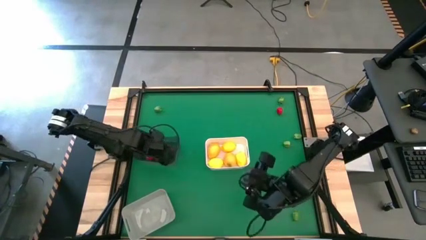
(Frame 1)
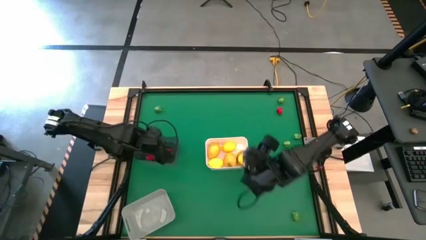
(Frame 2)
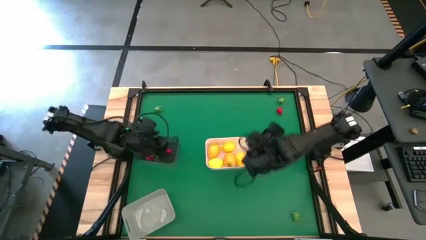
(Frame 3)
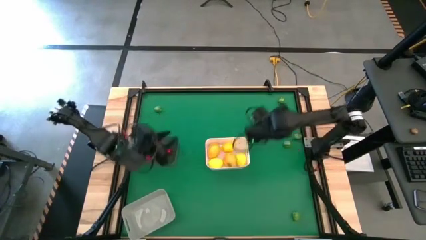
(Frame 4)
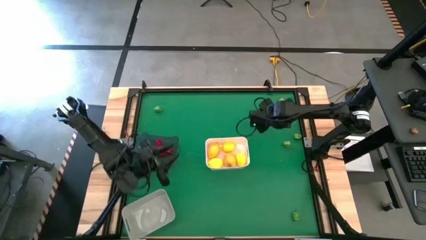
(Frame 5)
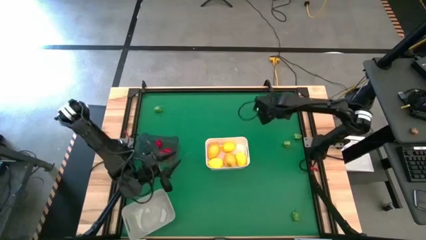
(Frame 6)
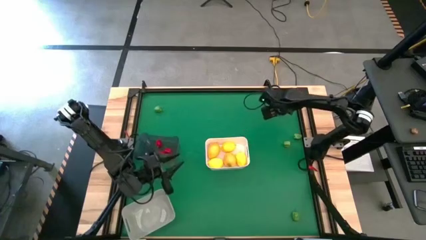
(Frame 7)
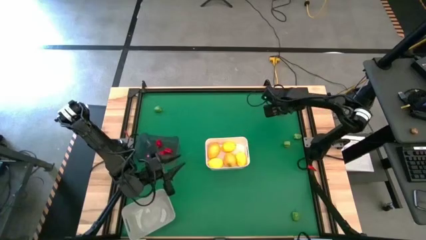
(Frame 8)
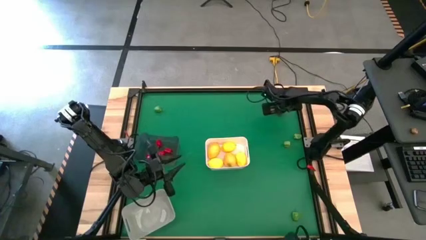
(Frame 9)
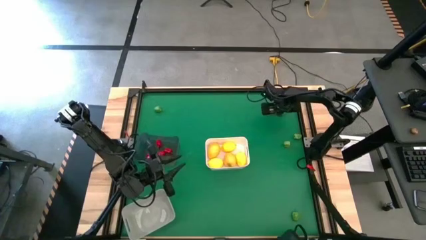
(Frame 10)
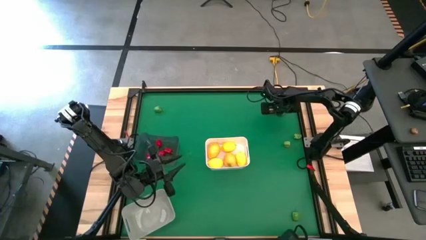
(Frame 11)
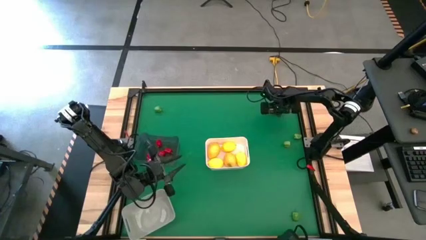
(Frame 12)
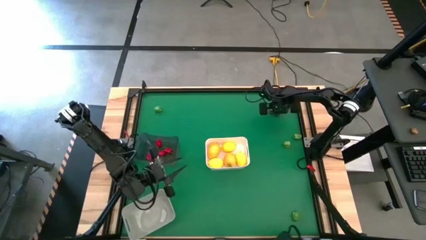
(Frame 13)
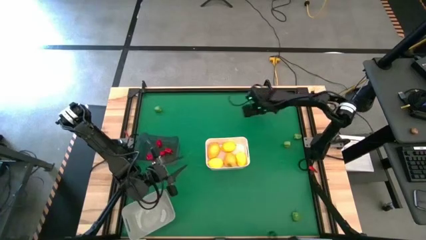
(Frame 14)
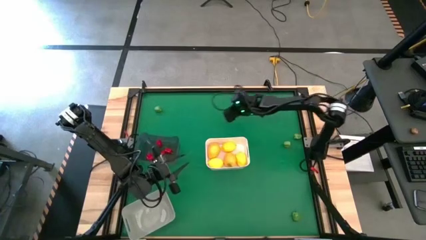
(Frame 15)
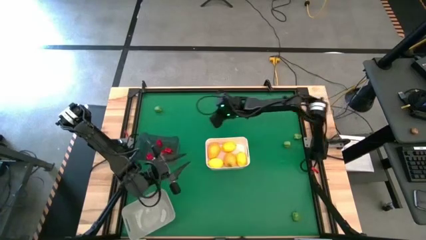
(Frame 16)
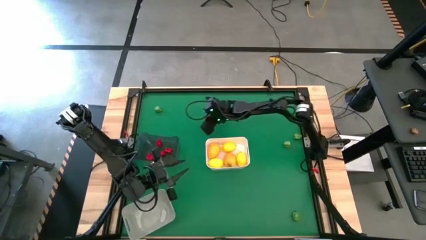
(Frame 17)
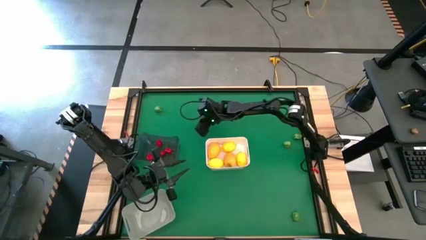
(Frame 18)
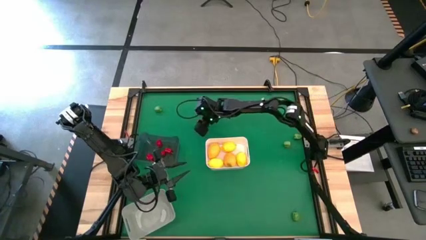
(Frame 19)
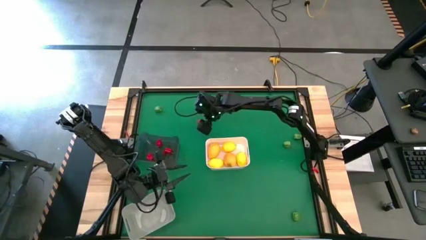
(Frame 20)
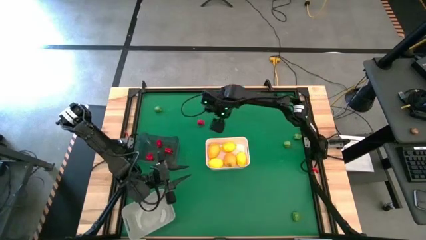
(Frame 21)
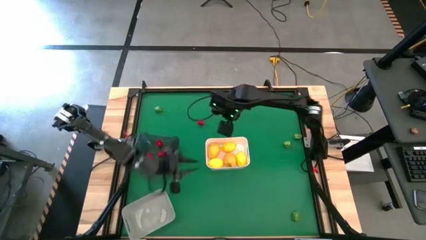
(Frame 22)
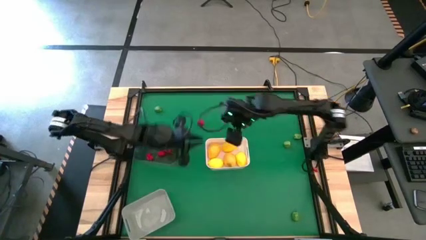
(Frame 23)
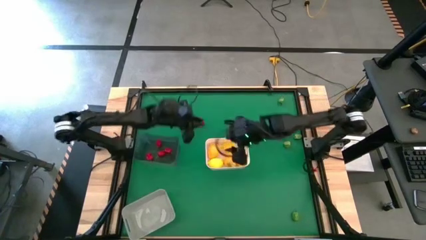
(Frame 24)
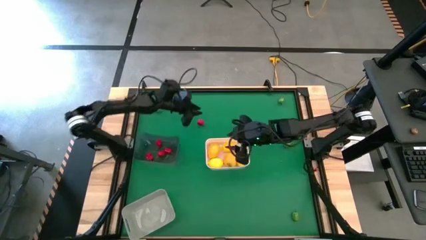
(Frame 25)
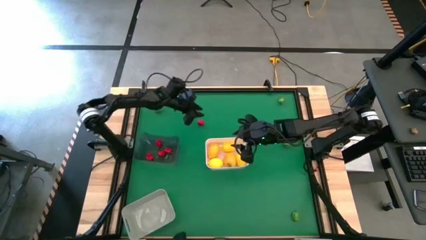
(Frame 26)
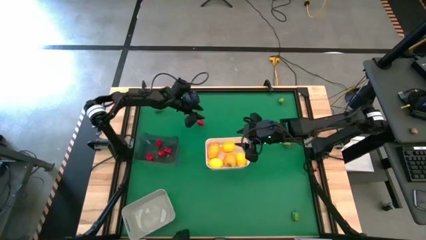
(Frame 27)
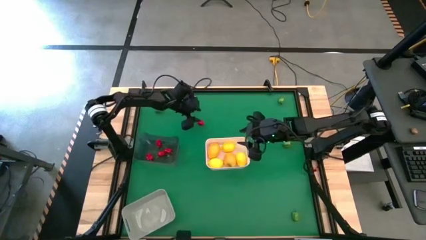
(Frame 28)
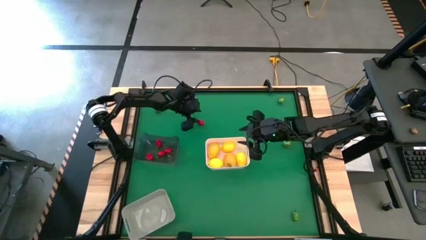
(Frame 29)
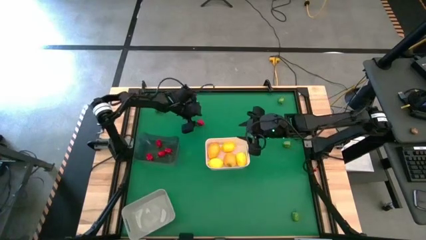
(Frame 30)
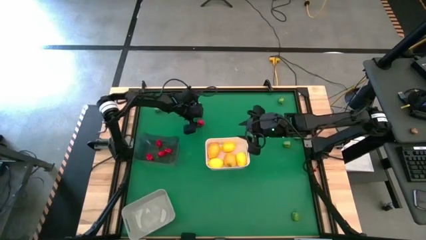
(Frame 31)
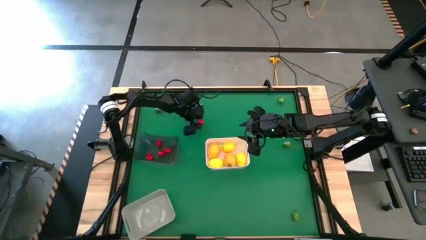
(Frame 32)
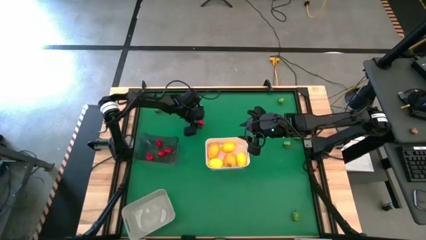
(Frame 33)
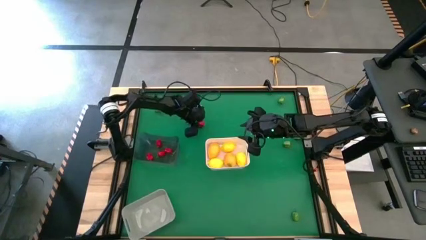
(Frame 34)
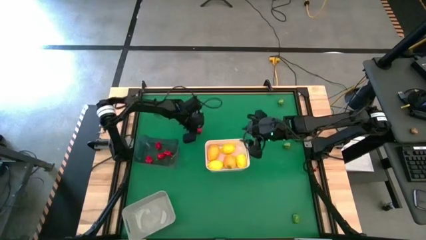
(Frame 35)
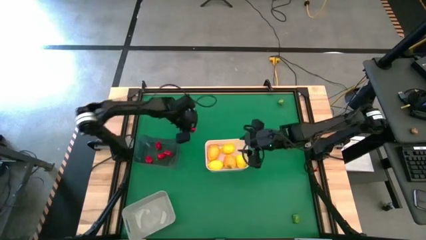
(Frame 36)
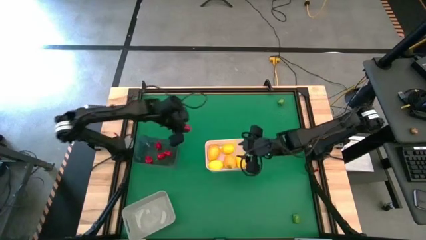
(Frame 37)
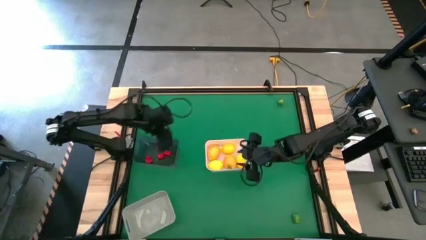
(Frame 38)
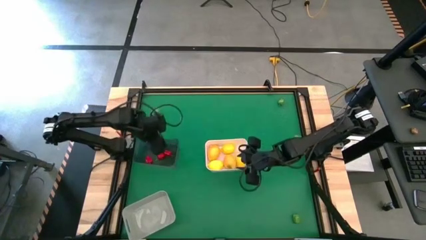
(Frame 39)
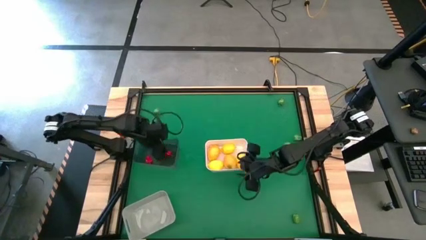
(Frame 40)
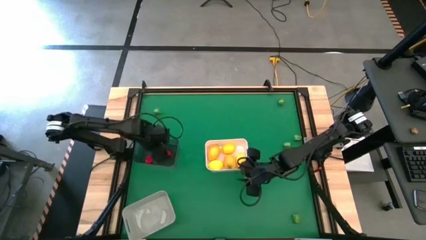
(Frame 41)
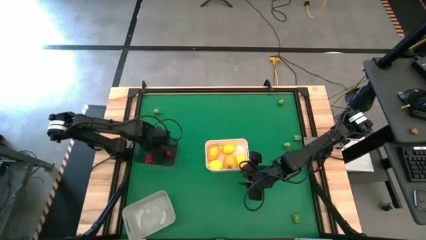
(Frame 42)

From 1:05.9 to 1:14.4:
Task: Sort produce into baskets
Put the red chili pepper into the black bin

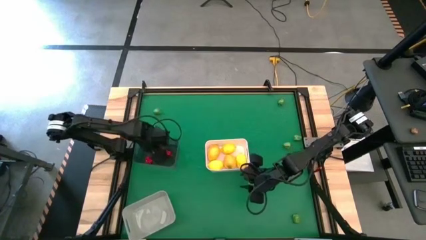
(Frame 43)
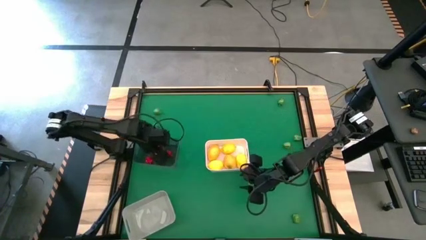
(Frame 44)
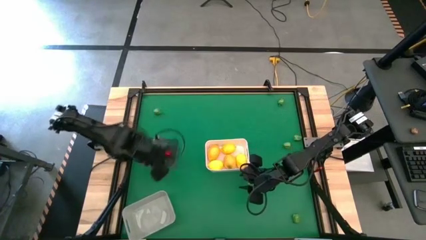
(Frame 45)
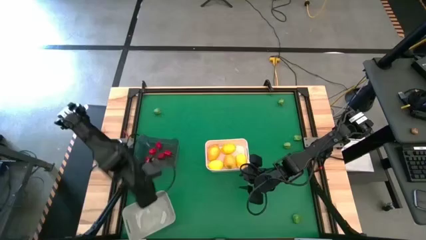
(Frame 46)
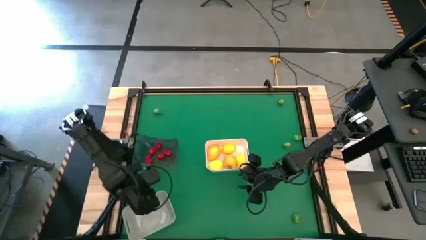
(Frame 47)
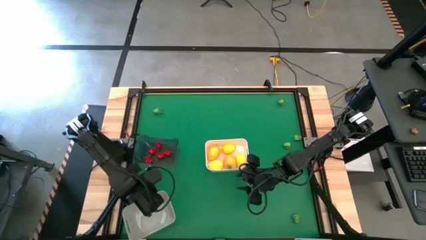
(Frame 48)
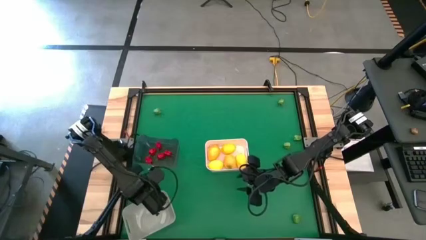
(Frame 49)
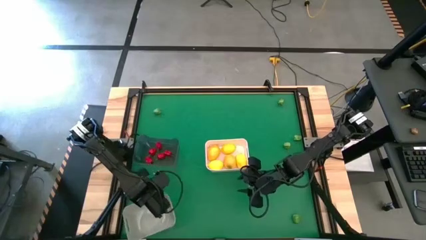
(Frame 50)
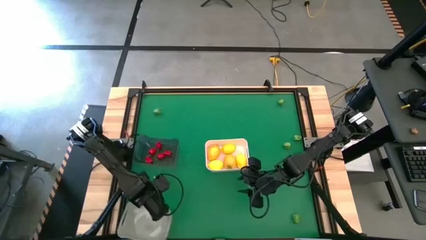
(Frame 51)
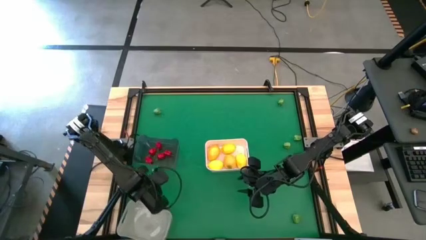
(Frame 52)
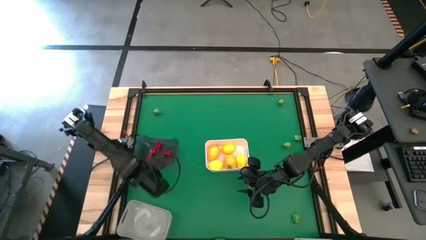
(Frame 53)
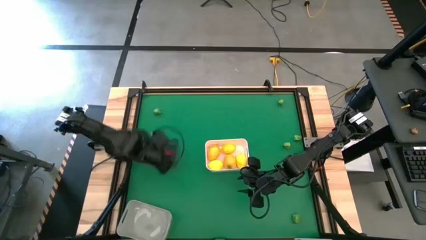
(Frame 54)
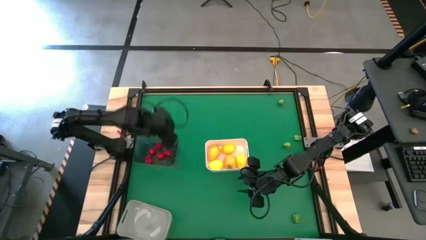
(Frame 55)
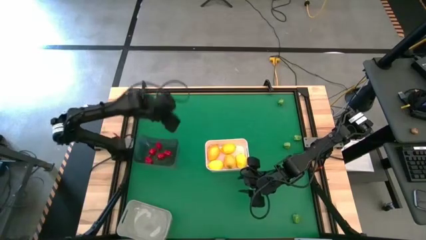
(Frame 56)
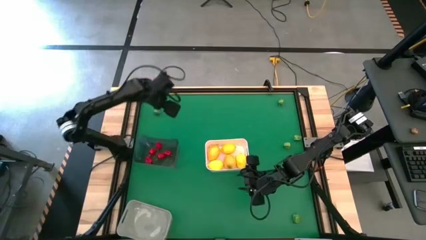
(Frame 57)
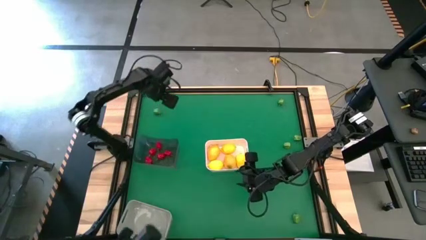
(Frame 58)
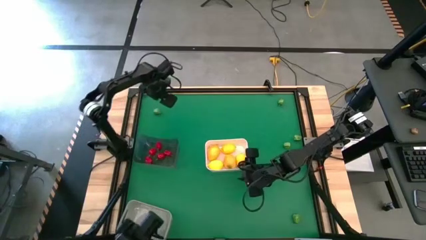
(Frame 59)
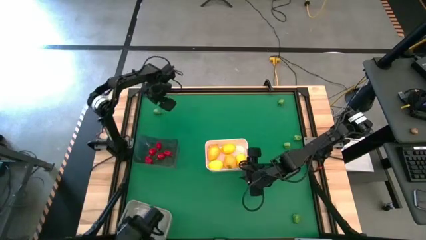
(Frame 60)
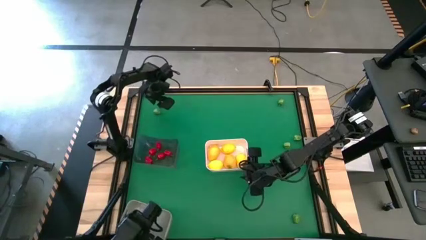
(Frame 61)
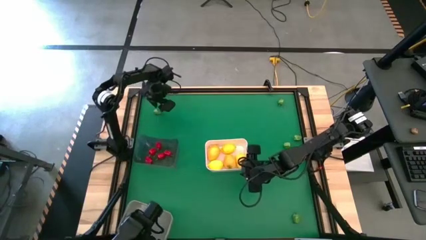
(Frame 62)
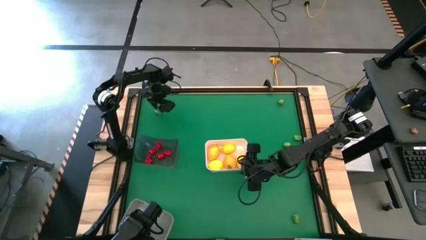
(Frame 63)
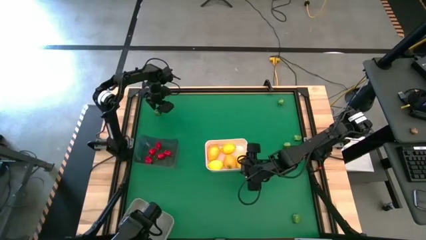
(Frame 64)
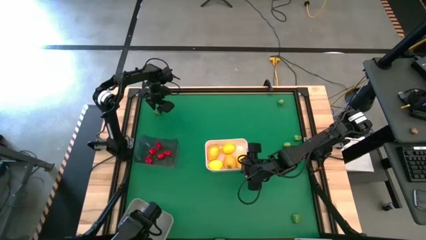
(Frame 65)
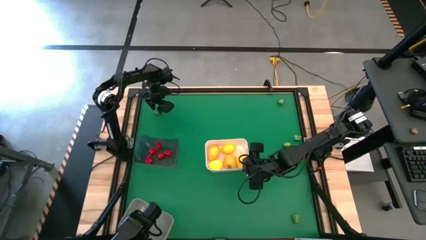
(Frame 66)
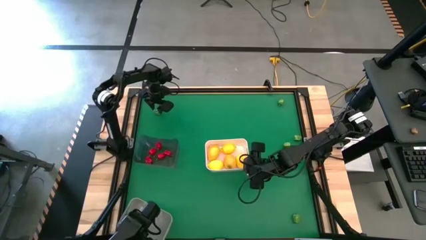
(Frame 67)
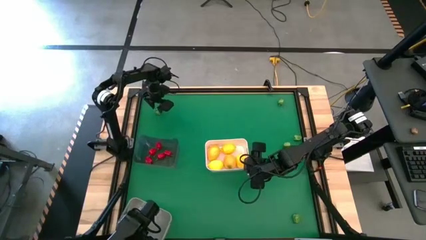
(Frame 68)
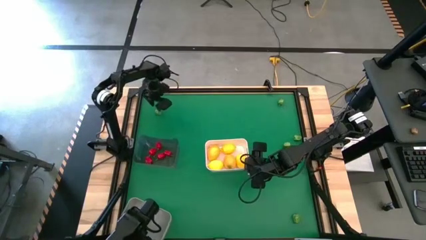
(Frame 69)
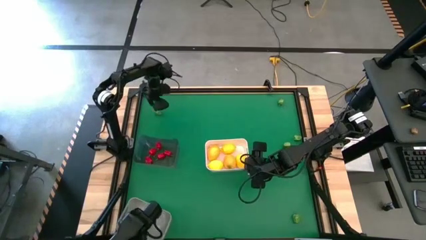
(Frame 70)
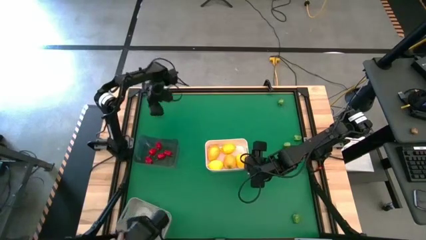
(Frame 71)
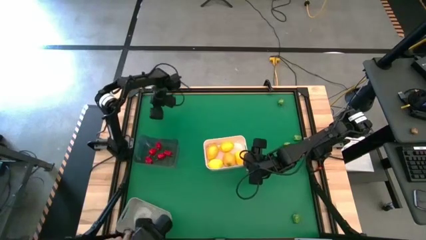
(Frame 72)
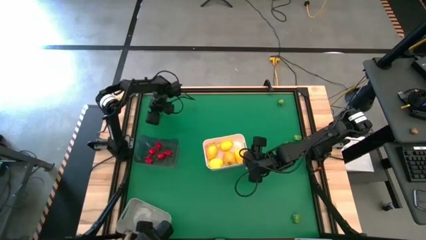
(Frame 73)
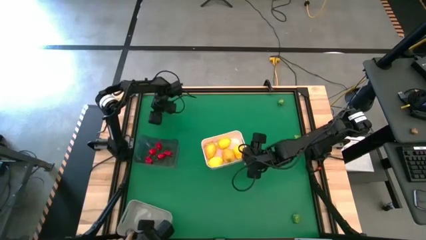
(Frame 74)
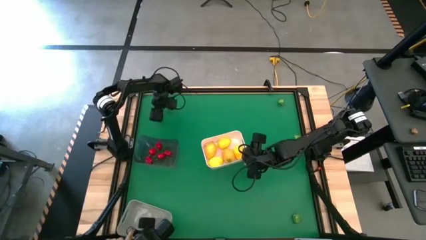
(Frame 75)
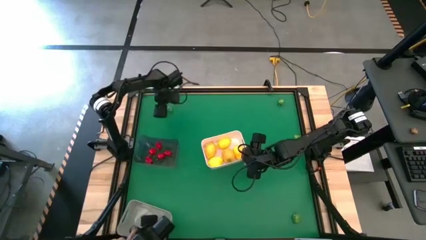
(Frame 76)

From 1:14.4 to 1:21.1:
Put the green chili pepper into the gray bin

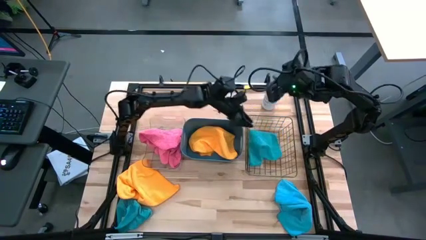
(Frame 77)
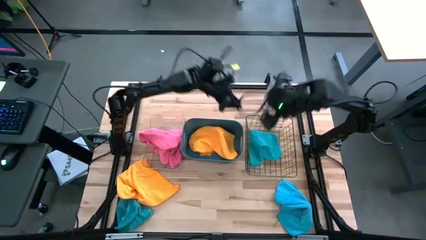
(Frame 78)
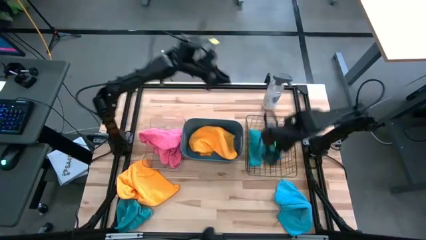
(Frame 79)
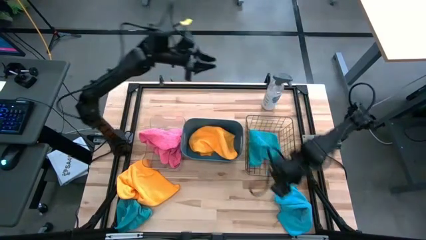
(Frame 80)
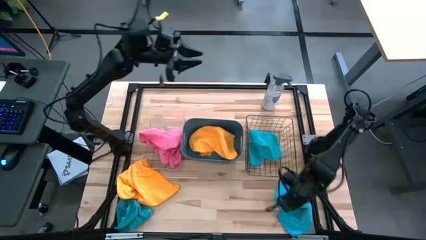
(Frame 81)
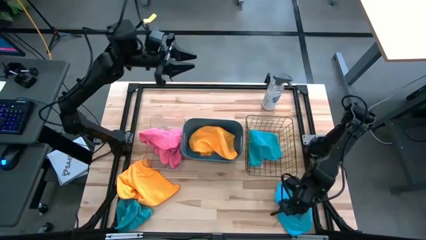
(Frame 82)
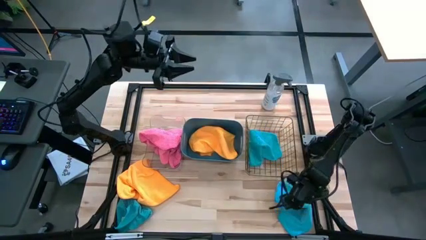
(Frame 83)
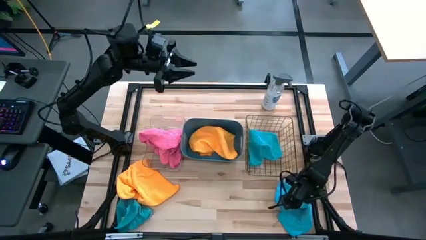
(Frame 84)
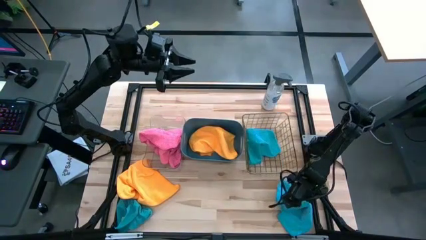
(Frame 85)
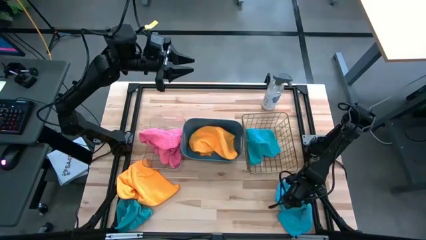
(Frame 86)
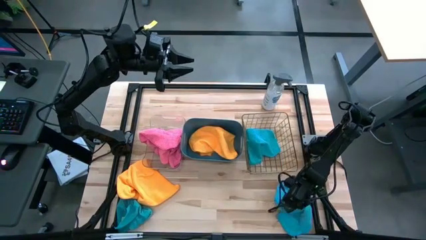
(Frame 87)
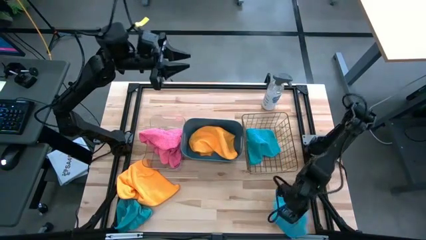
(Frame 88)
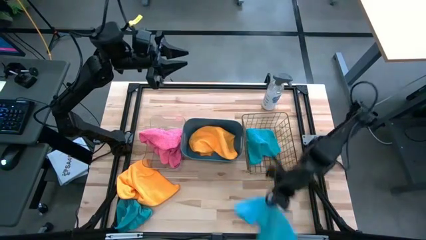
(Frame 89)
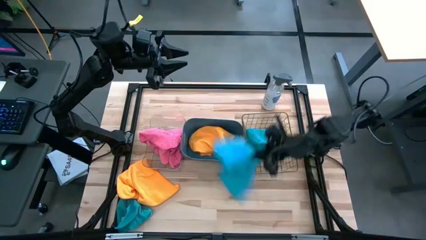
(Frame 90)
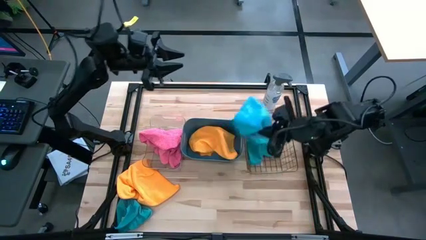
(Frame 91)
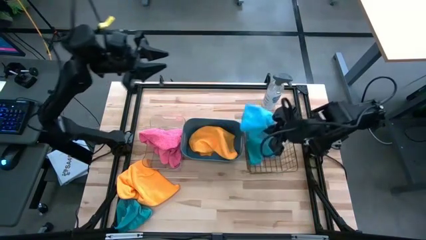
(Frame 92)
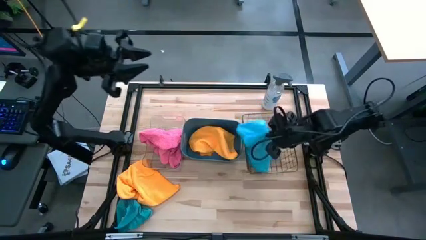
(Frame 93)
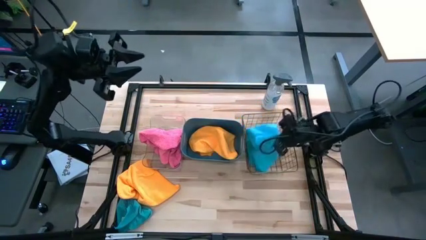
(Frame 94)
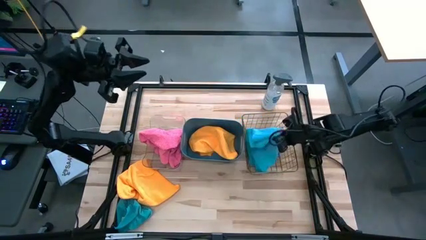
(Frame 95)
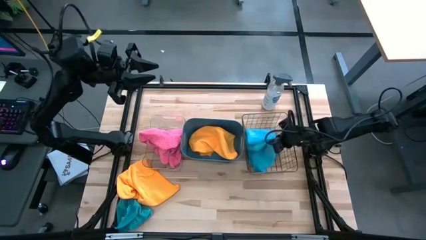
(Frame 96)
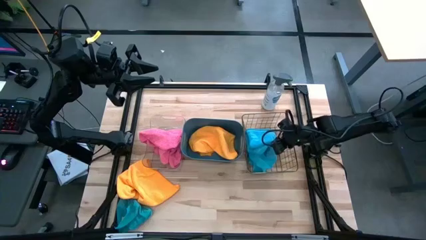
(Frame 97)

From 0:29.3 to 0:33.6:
Task: Sort microfiber towel by color & place in baskets
Put the right blue microfiber cloth into the wire basket
